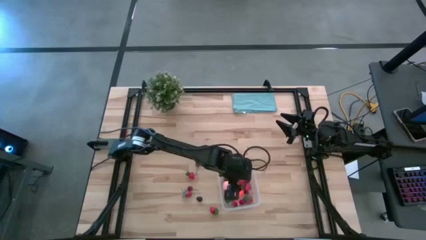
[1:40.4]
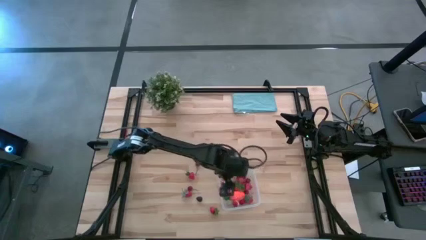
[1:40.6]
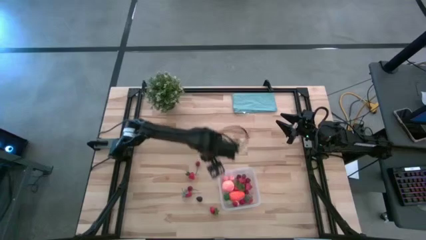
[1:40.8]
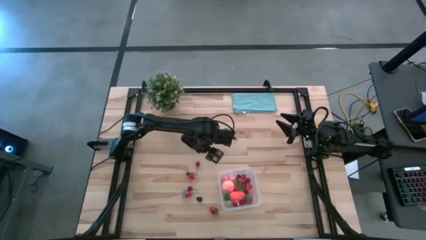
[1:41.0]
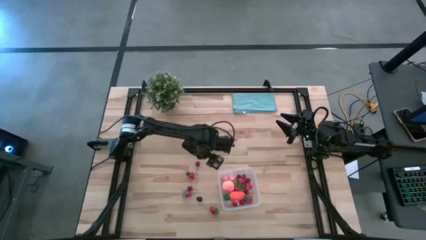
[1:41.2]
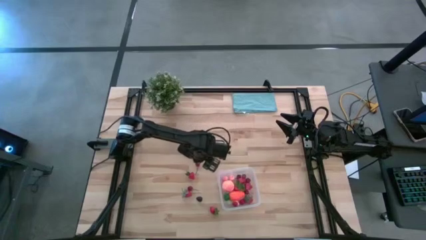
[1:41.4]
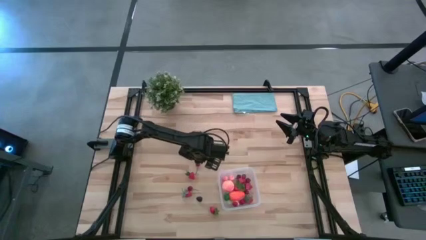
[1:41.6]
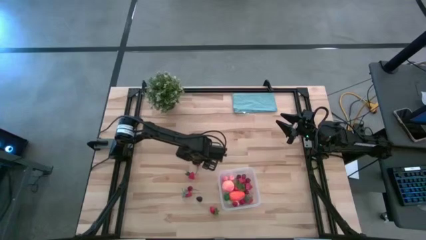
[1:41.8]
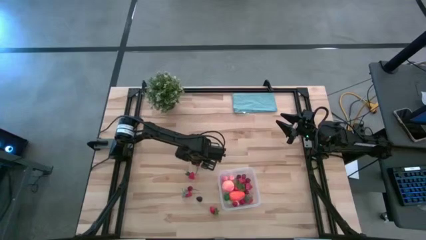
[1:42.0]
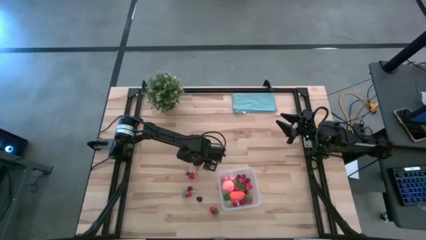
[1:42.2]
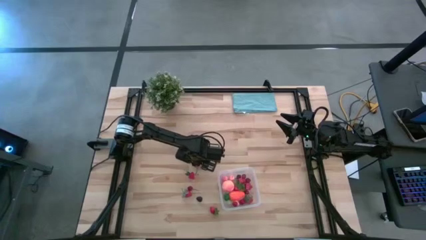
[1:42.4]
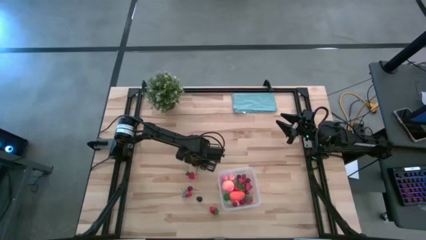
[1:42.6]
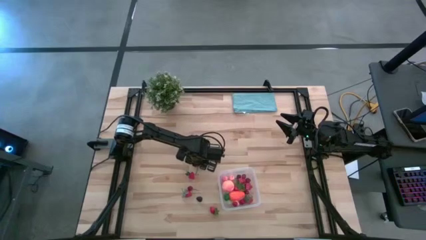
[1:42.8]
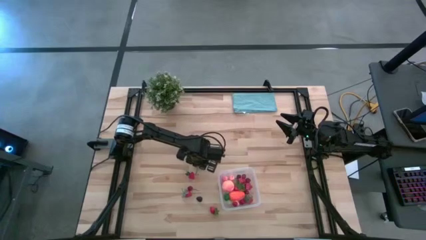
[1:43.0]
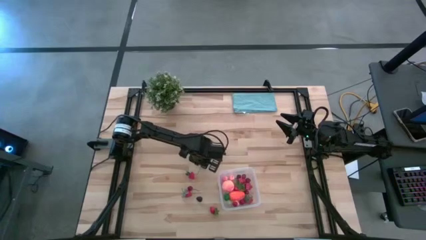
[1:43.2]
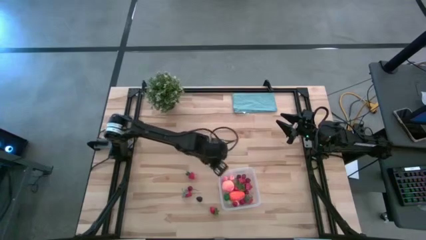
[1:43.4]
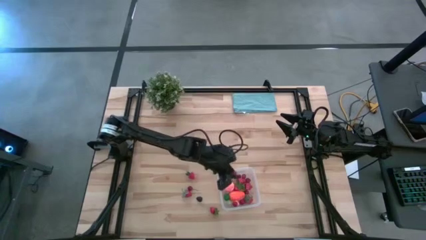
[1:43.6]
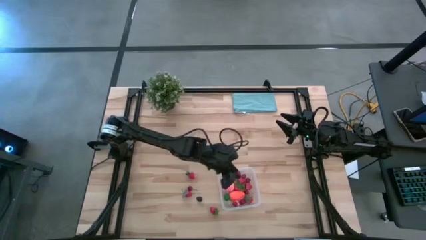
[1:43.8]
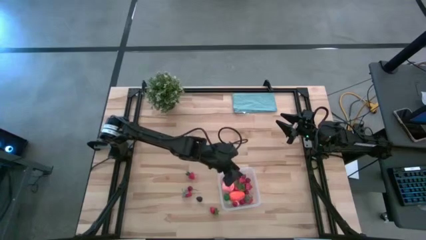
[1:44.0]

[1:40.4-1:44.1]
Task: Pick and placing Produce into tupperware
Put the red cherry into the transparent container

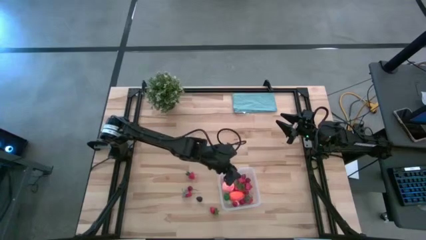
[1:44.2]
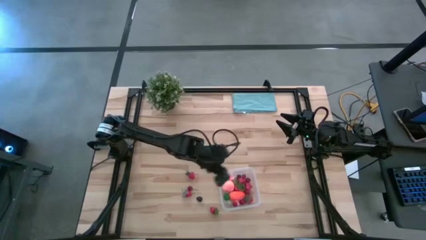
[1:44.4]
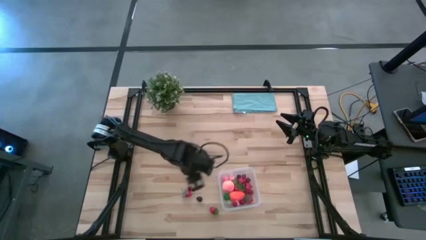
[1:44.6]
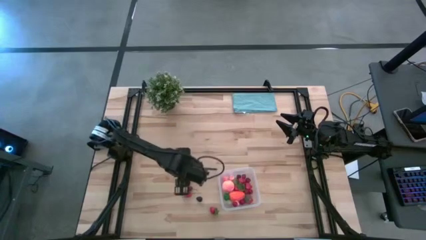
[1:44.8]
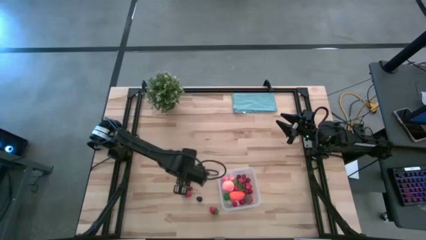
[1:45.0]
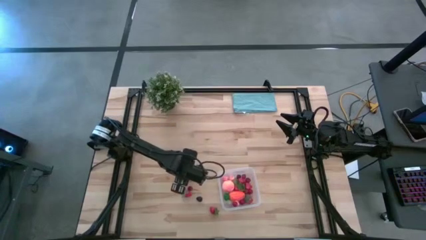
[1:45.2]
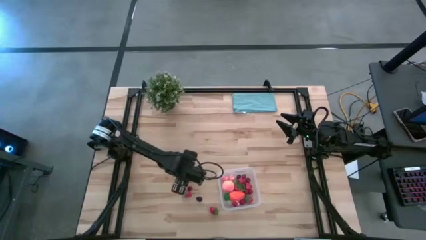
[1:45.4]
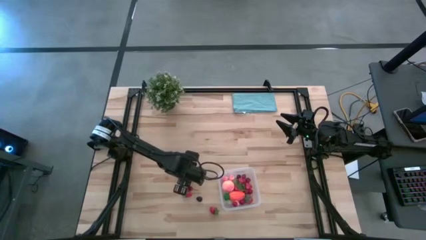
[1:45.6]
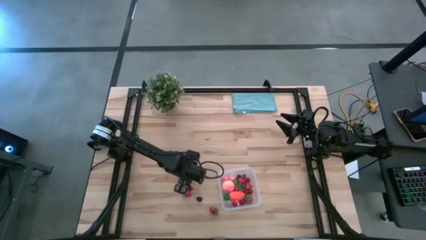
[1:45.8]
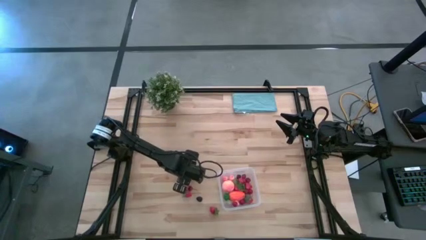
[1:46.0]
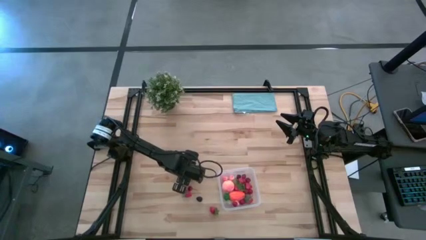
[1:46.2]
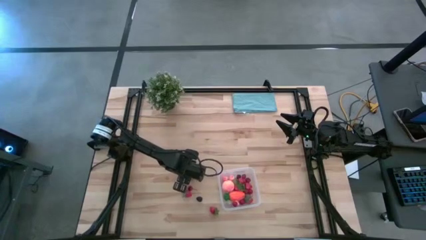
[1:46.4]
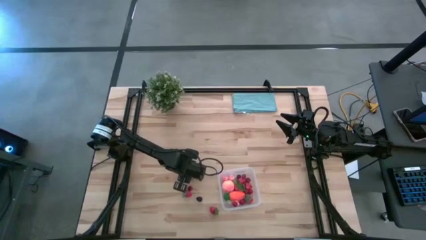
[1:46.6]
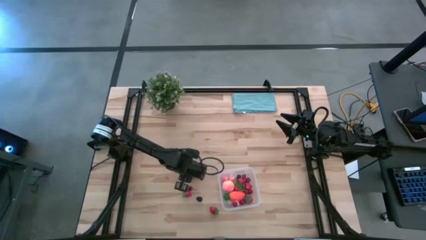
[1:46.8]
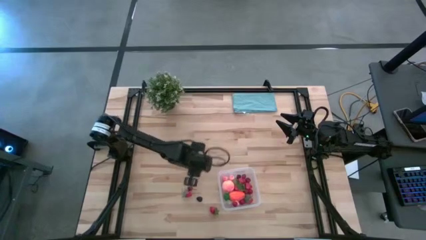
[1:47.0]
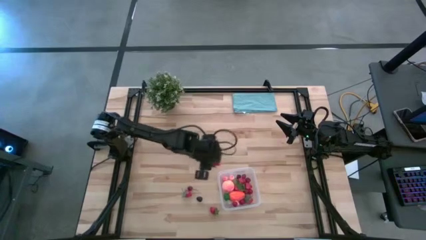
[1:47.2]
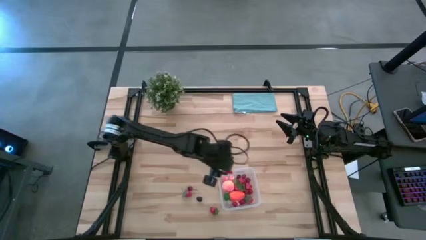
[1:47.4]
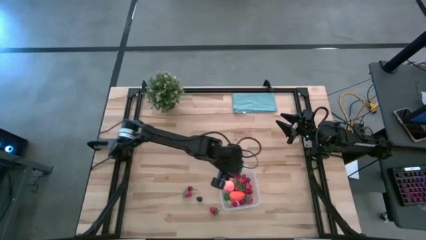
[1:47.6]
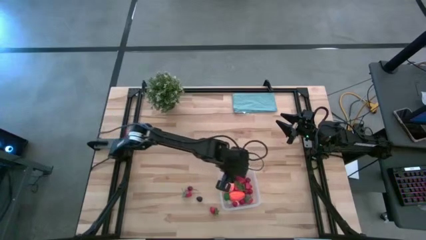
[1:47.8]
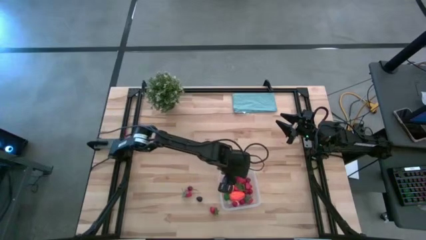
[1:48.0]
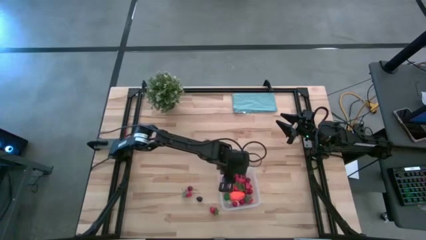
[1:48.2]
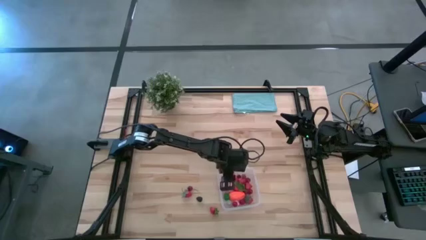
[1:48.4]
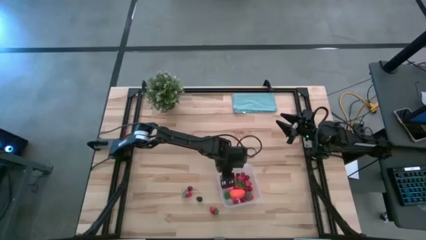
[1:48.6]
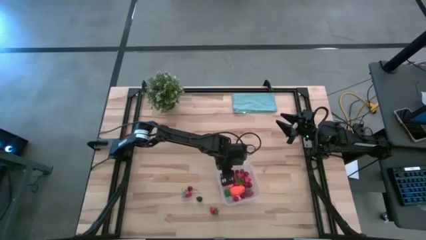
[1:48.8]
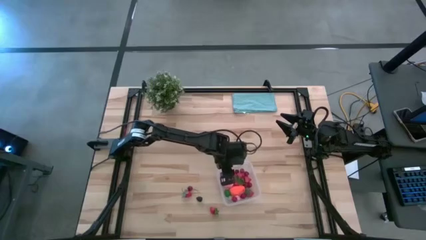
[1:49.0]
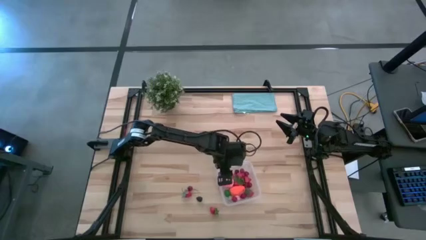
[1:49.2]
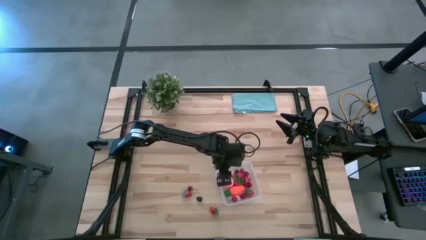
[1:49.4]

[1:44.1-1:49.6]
Put the red strawberry into the transparent container

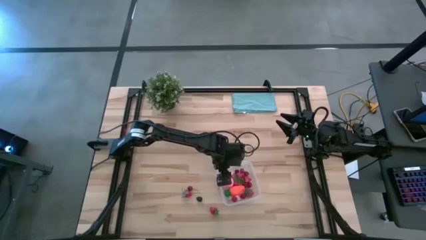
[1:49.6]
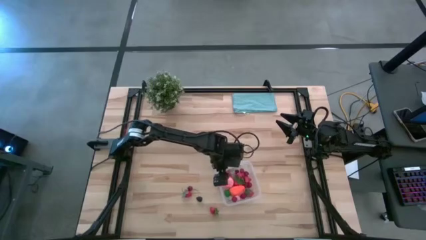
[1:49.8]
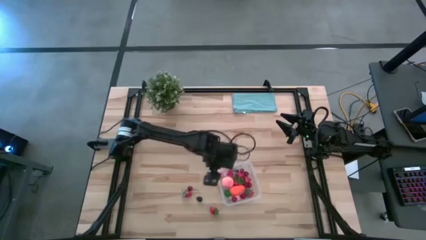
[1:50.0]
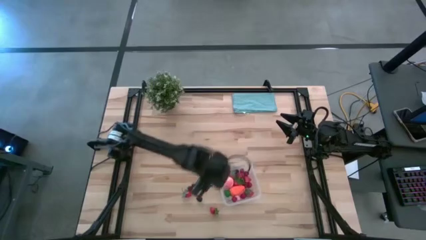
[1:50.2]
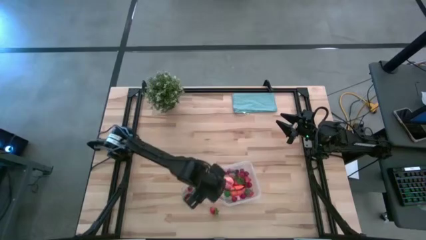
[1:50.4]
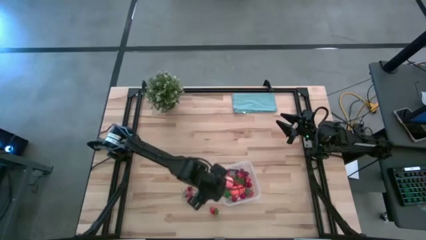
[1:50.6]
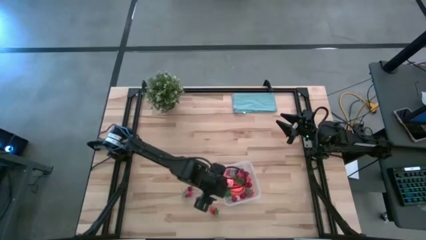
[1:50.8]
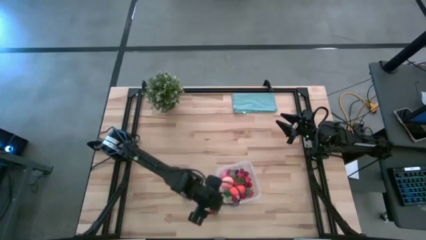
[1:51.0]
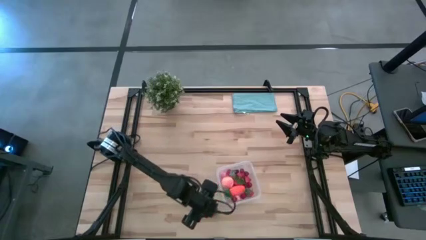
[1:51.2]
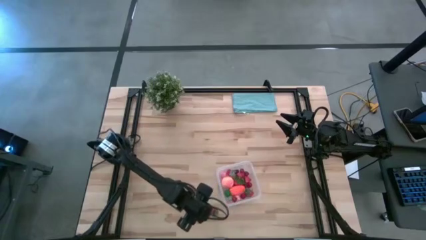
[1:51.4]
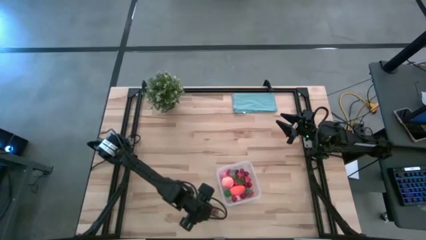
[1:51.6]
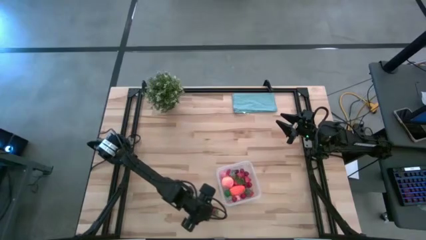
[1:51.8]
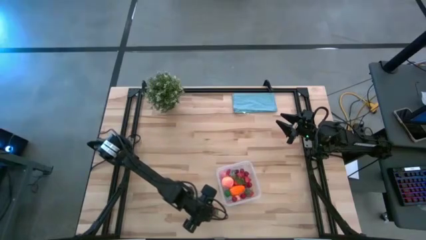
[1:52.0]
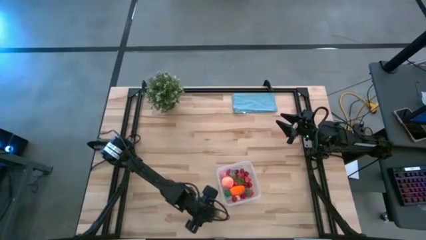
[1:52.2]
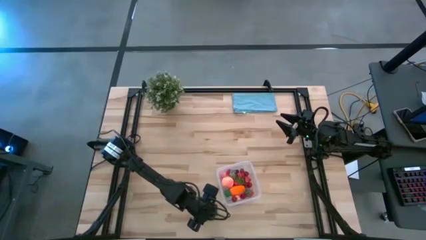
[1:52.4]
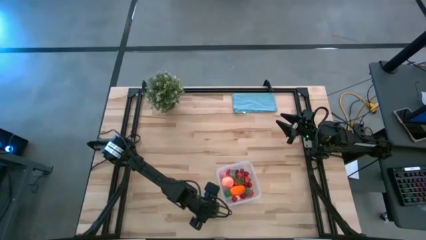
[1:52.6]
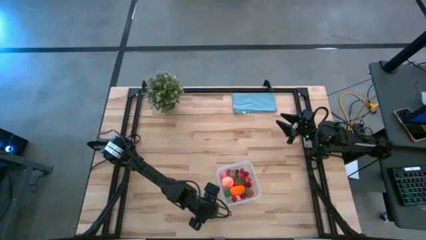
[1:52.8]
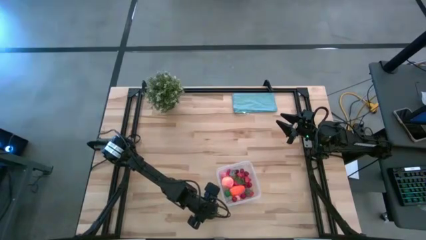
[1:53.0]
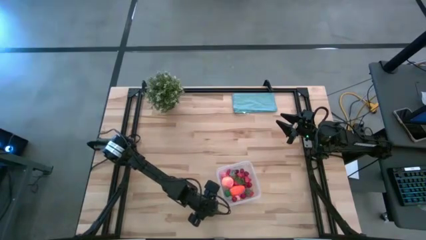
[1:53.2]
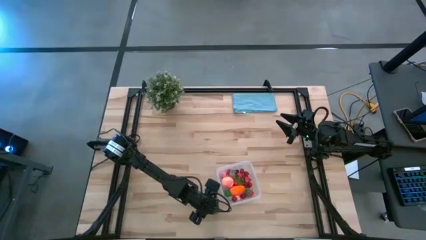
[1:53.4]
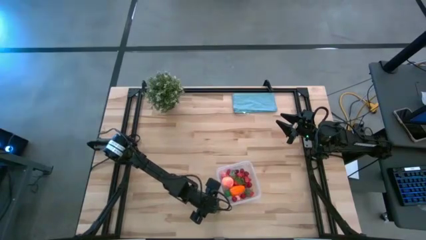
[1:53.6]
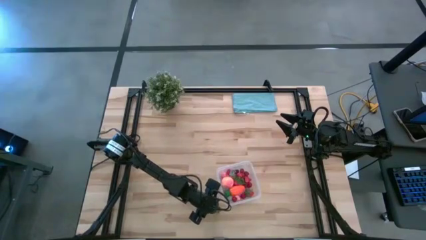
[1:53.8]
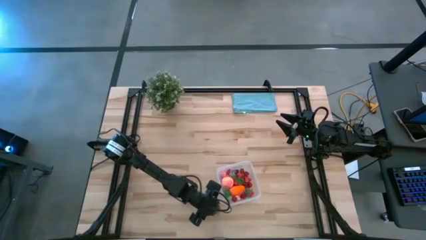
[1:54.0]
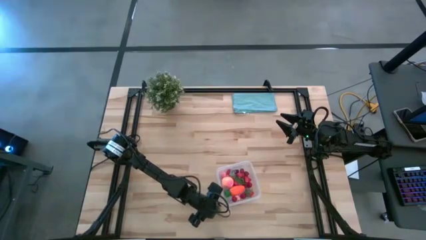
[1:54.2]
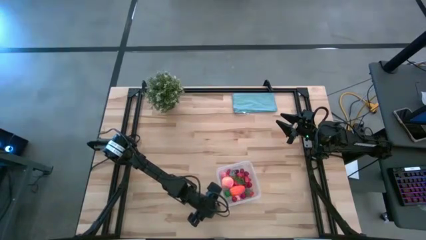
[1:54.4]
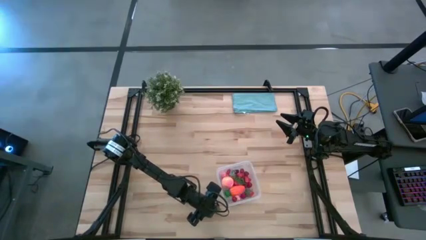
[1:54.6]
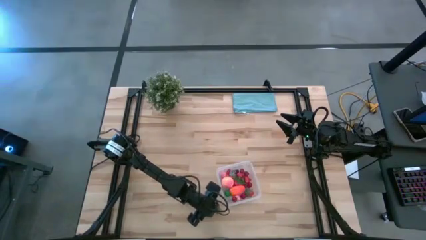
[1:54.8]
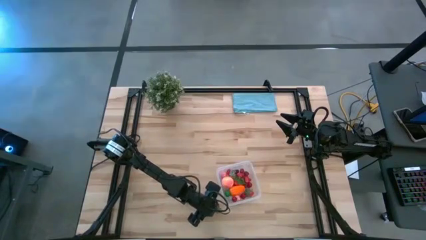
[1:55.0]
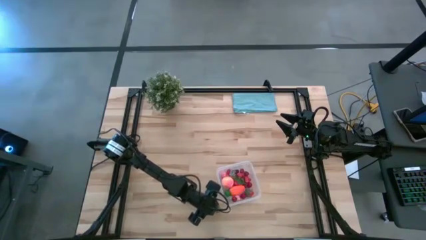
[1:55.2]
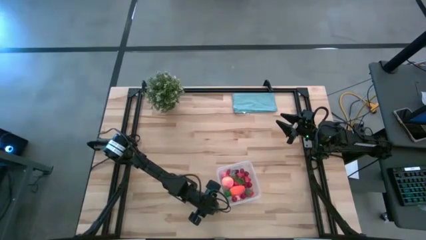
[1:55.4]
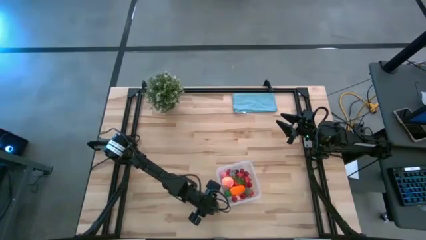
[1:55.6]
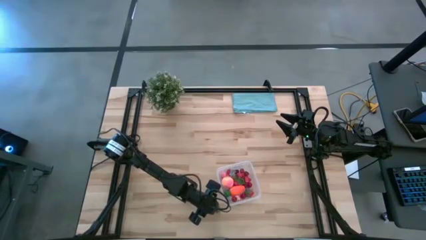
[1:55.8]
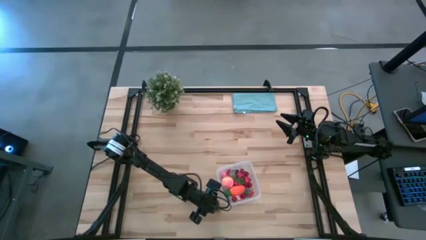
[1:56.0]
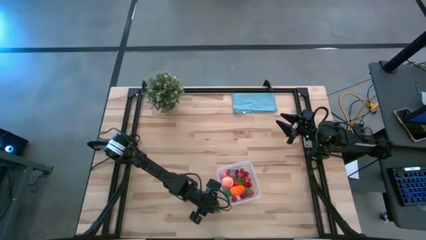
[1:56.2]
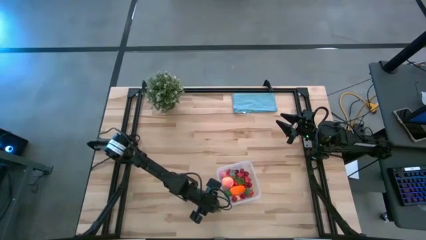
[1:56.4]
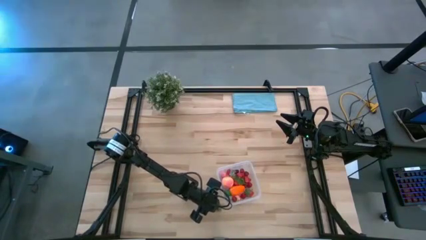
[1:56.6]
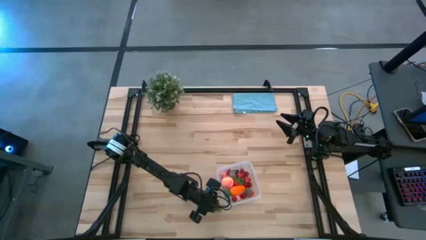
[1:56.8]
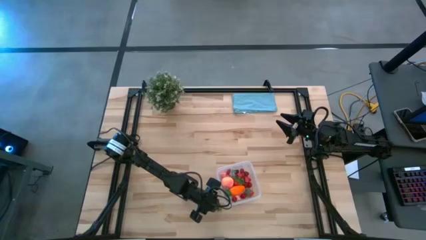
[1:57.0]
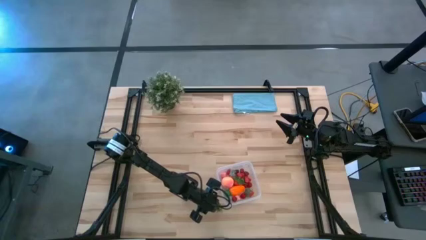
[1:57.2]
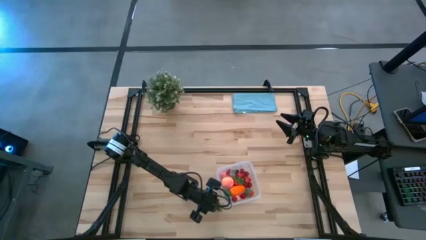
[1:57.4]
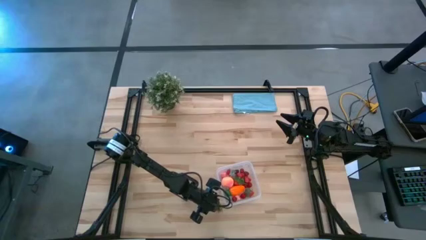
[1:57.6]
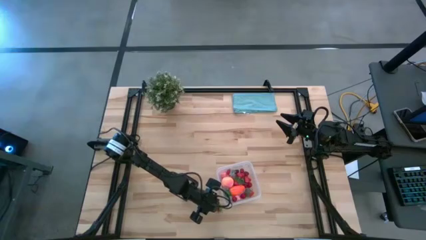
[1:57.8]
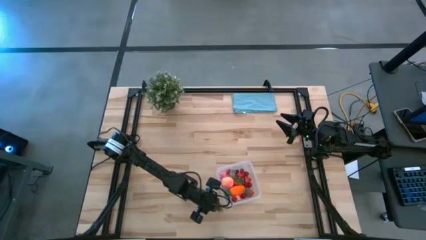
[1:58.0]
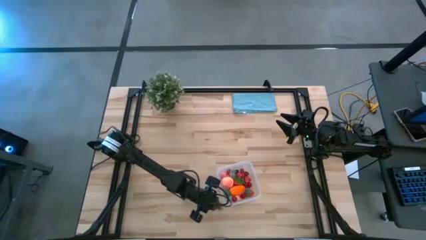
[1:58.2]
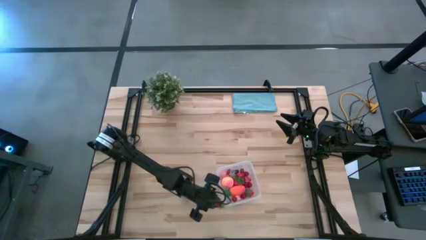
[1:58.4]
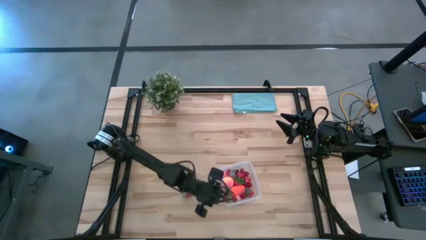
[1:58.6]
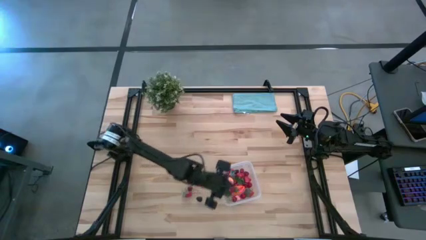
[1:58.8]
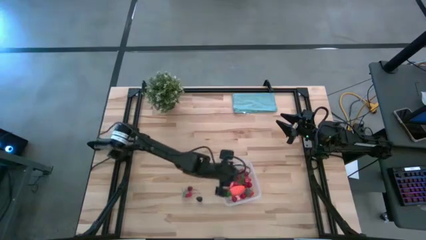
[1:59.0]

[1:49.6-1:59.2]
Put the red strawberry into the transparent container
